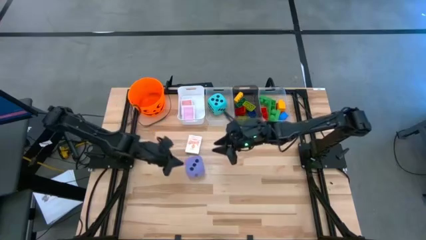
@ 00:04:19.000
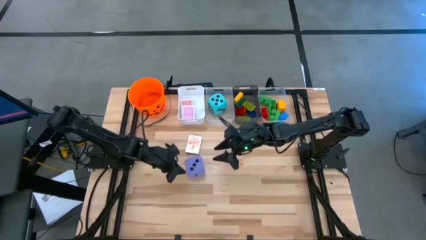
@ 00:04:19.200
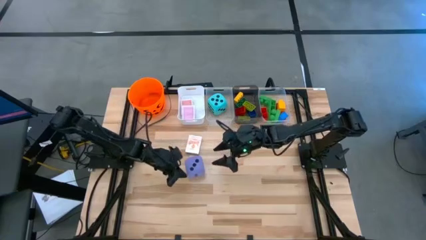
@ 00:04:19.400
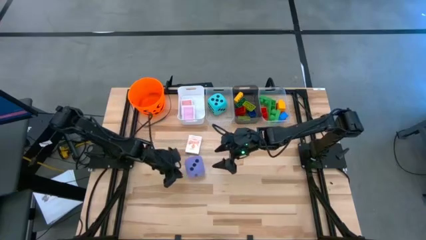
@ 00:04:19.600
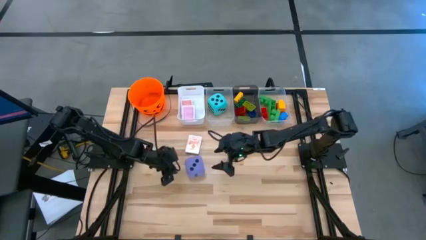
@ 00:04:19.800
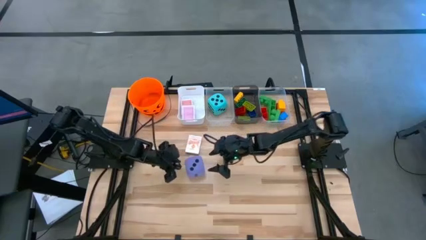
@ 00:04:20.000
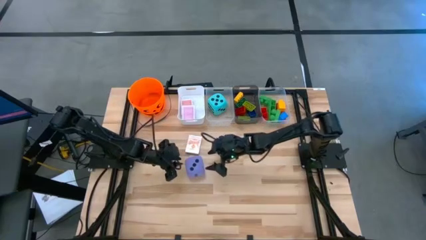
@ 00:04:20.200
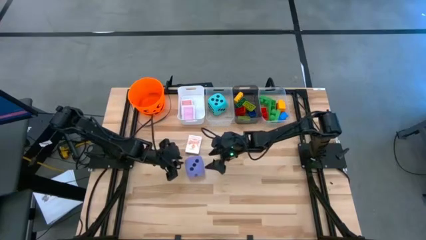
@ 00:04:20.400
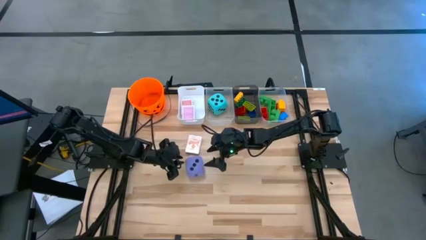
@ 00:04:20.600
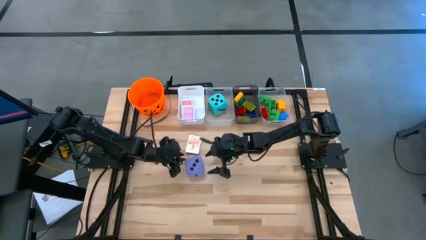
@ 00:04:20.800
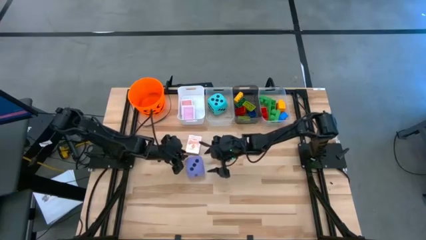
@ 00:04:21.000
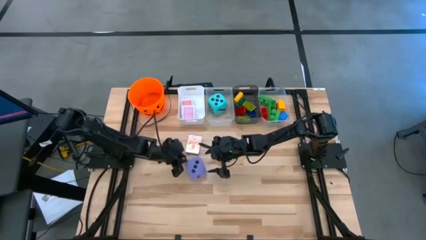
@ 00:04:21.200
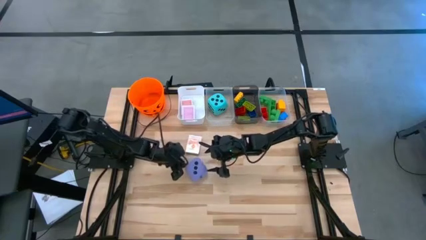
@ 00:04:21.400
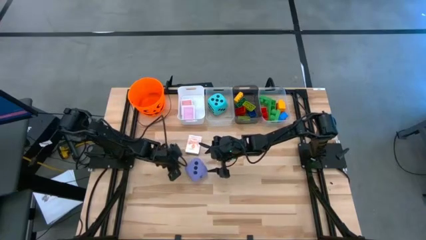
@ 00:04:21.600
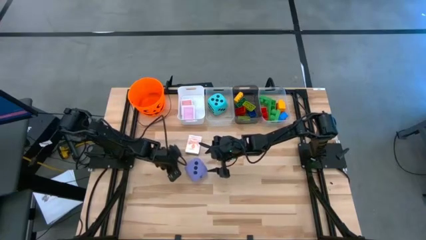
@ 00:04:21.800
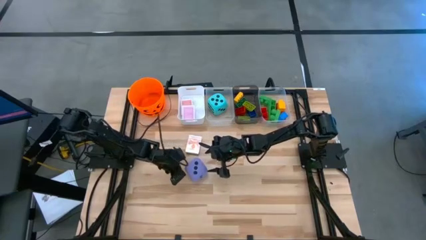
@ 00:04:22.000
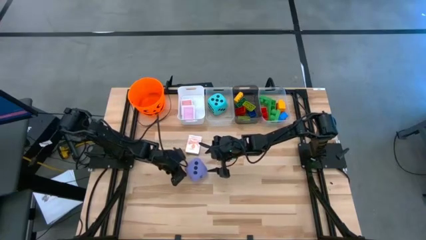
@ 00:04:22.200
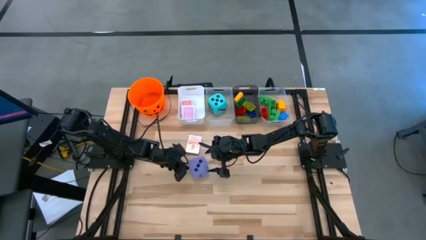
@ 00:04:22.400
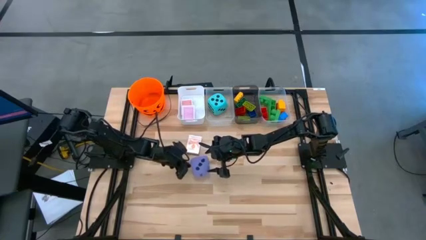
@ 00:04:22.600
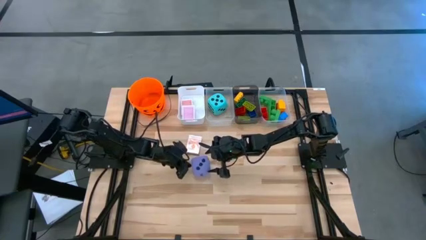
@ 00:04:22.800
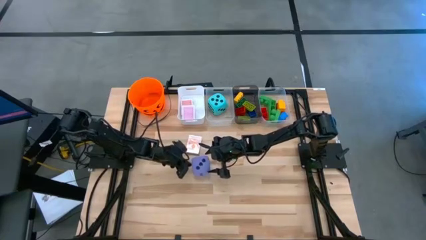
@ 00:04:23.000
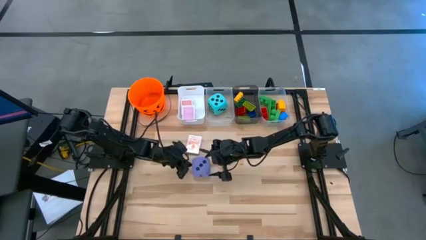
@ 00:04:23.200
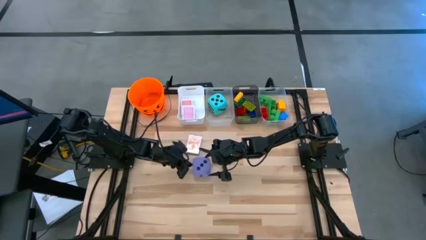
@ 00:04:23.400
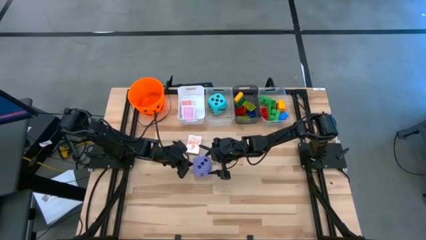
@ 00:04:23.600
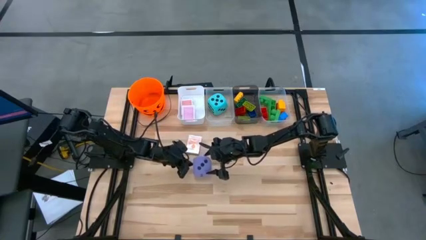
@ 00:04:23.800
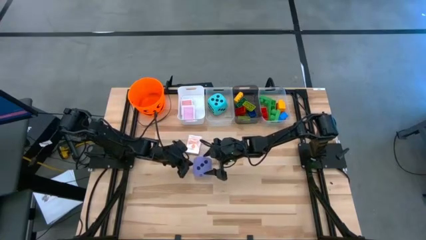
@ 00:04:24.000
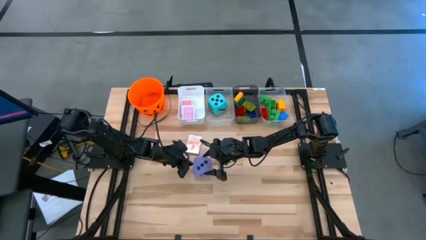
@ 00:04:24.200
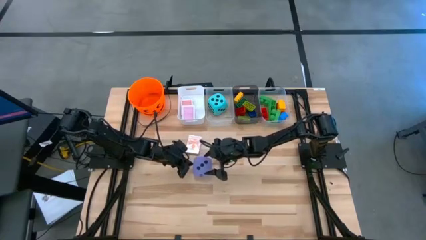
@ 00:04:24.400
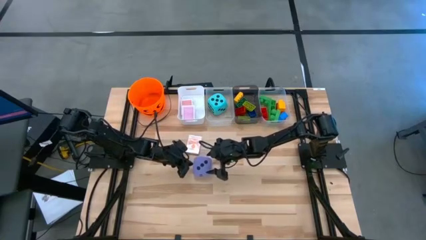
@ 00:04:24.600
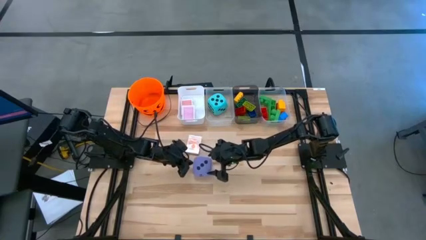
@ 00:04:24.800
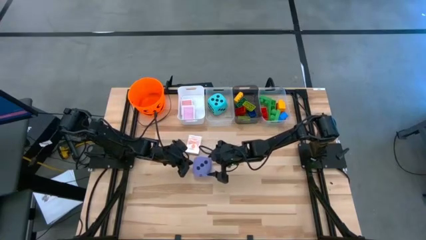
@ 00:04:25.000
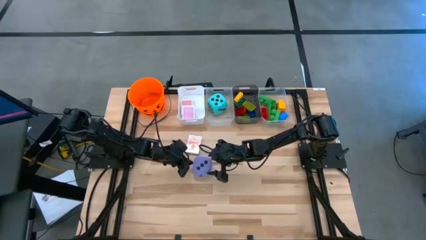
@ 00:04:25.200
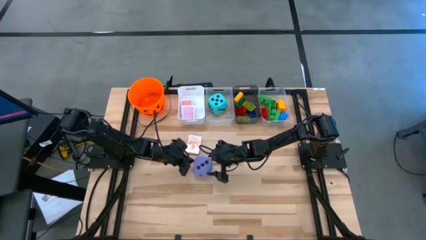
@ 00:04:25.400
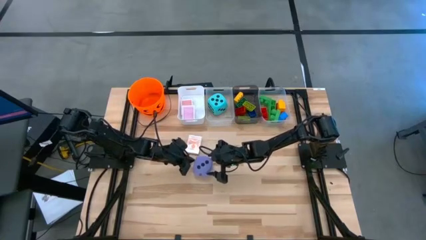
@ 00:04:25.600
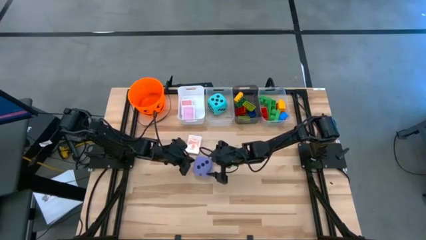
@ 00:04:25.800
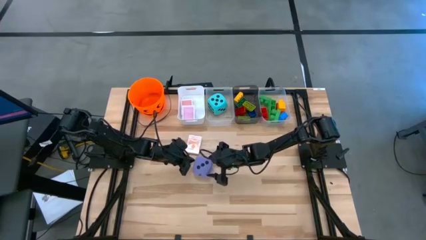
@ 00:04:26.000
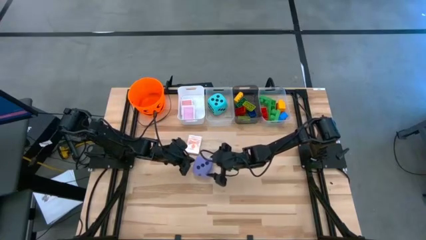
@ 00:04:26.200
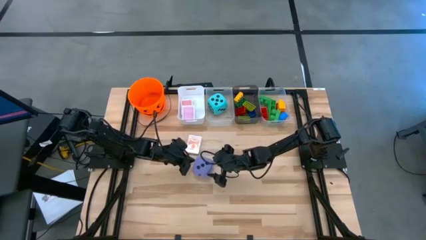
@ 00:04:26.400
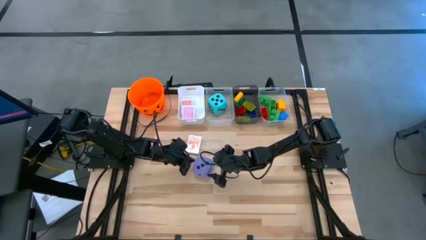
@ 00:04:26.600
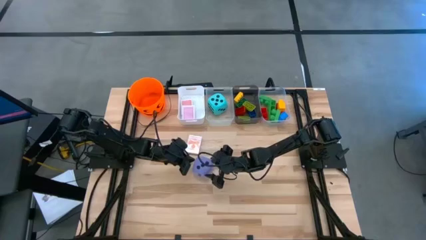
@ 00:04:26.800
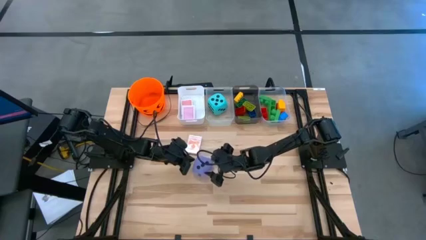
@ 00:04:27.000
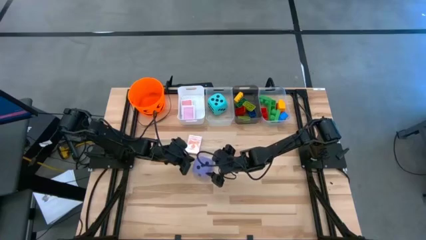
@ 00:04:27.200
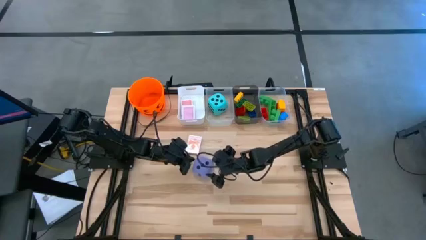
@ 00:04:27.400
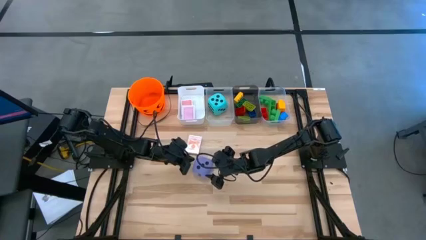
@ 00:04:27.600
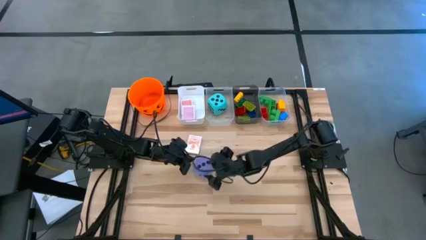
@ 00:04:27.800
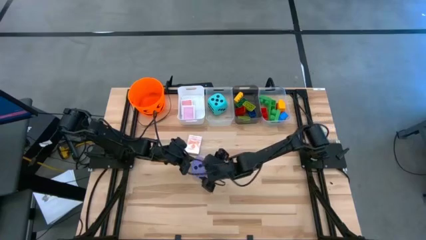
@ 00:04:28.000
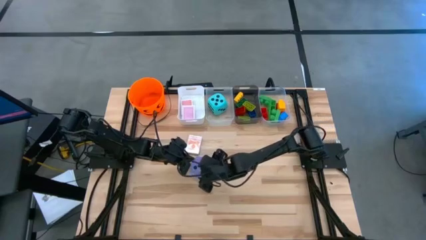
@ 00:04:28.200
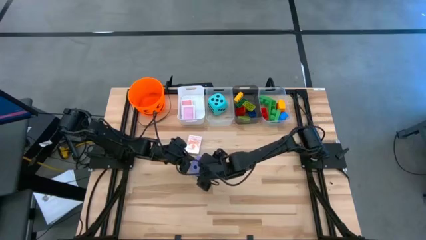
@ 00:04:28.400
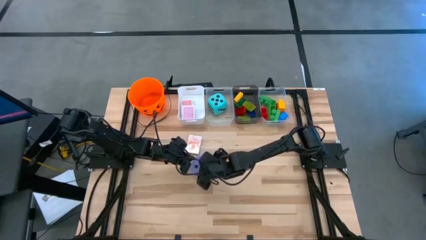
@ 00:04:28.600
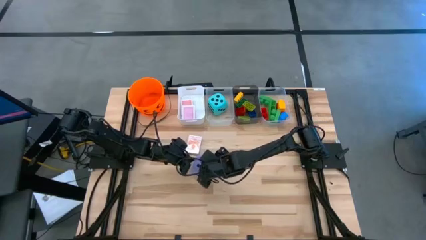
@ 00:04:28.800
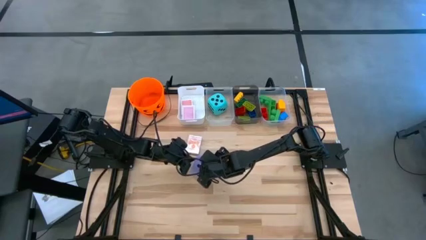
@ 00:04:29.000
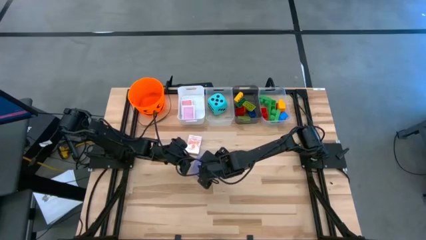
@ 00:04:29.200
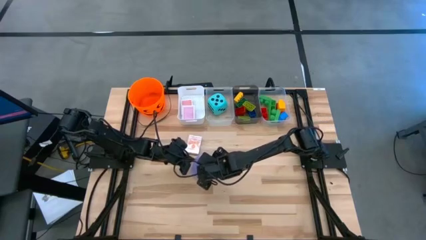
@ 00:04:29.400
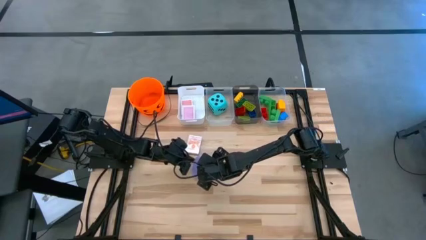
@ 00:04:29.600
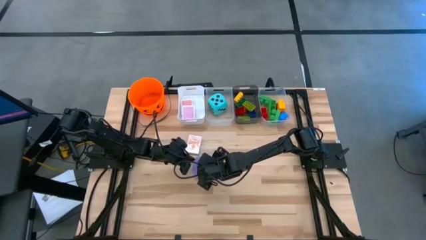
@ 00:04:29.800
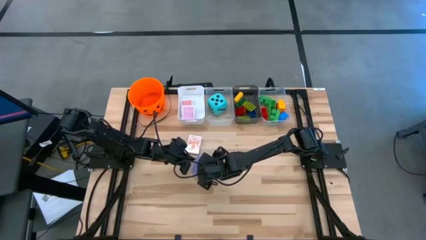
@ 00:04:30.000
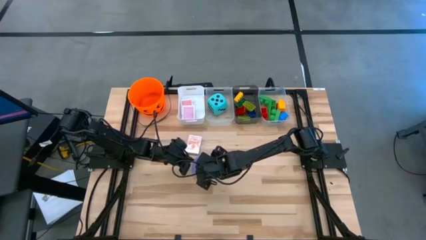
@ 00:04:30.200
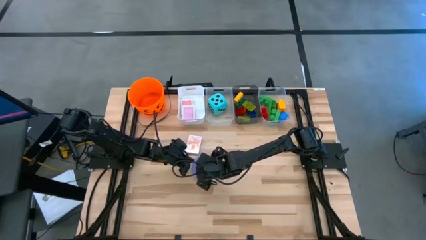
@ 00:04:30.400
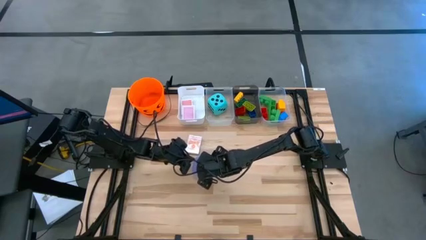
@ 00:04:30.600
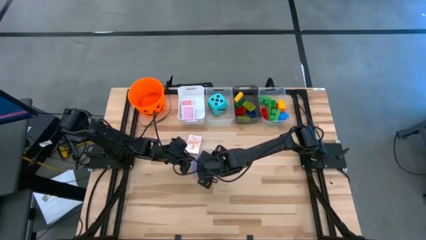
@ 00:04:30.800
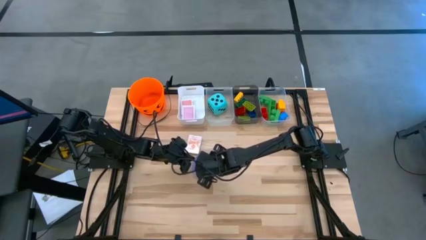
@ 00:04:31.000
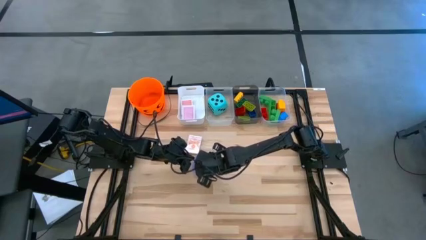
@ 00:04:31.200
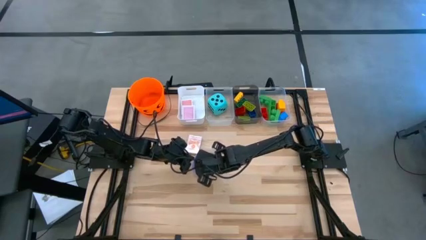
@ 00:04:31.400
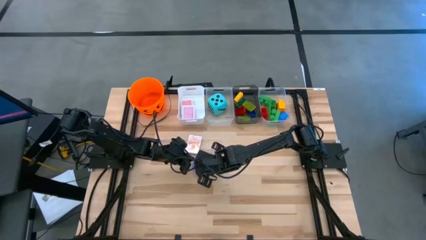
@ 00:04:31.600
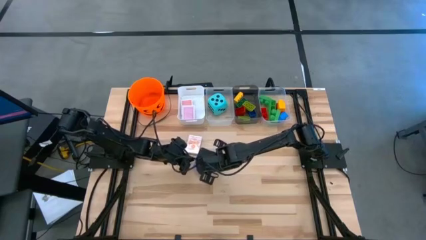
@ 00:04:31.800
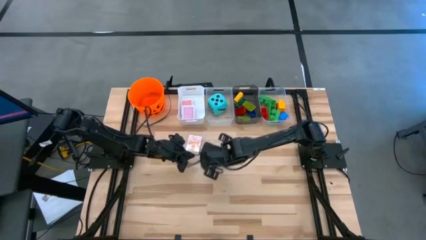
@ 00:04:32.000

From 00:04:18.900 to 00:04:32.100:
Task: Pick & Place Toys
Put the violet dice into the left transparent bin
